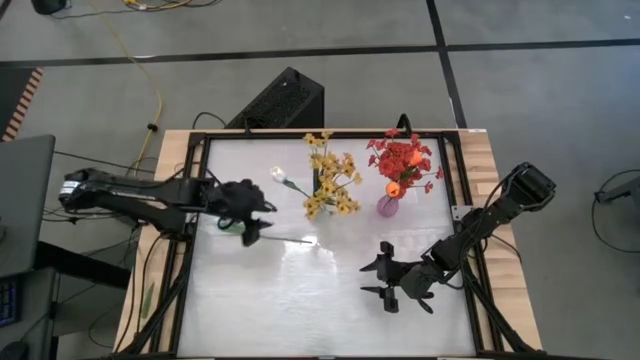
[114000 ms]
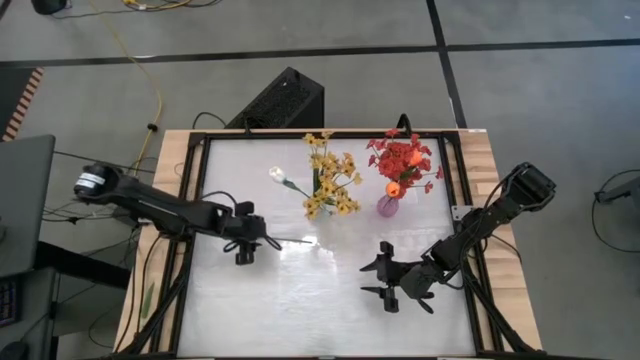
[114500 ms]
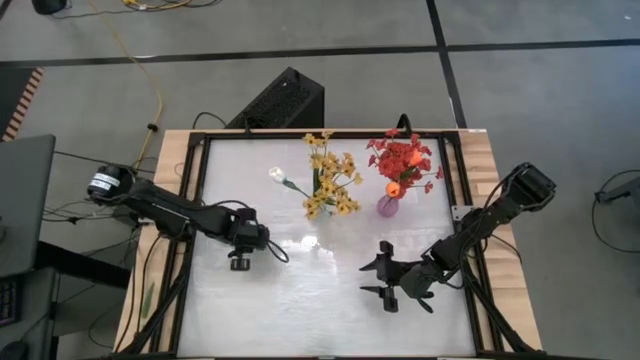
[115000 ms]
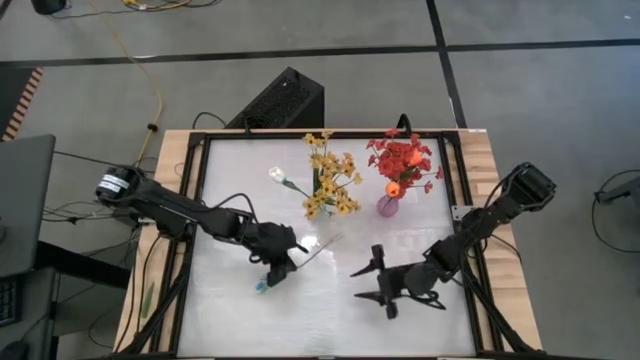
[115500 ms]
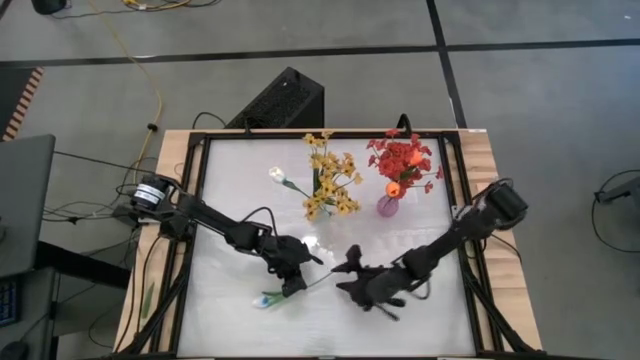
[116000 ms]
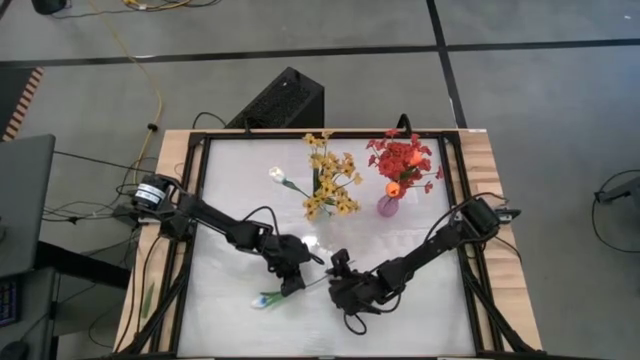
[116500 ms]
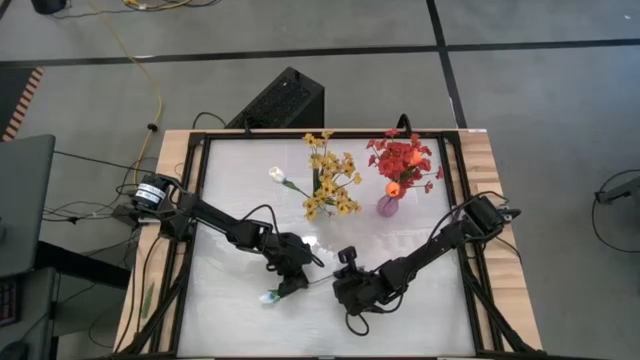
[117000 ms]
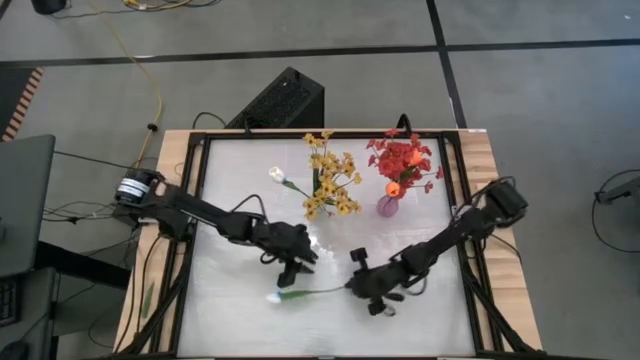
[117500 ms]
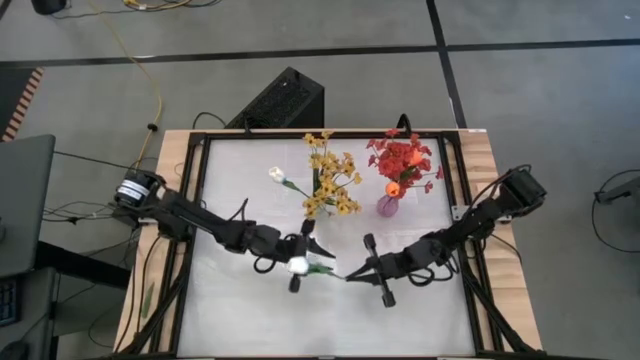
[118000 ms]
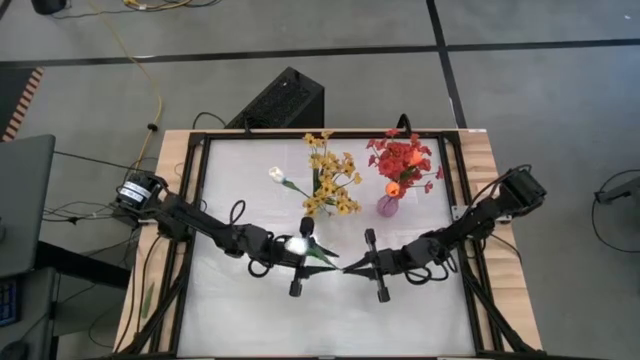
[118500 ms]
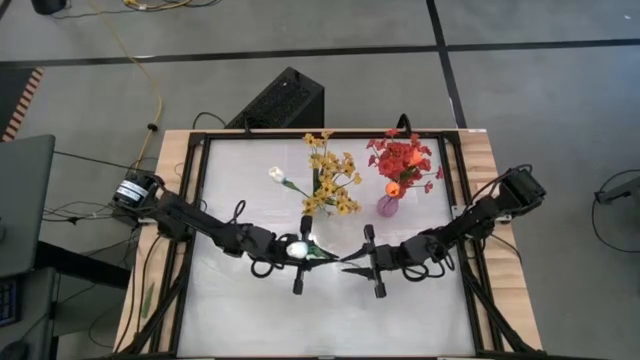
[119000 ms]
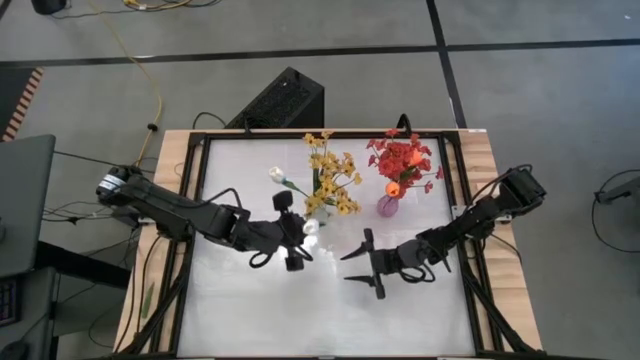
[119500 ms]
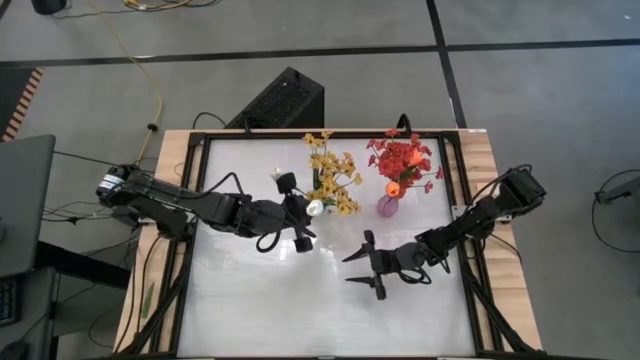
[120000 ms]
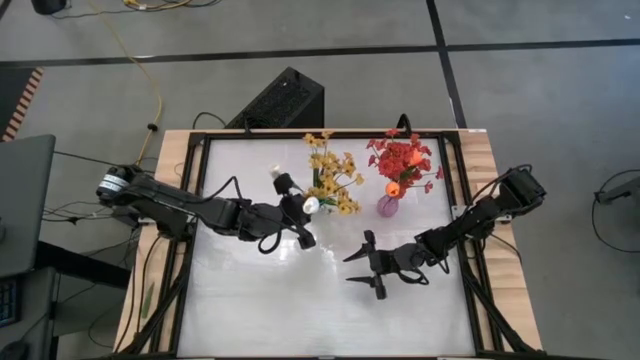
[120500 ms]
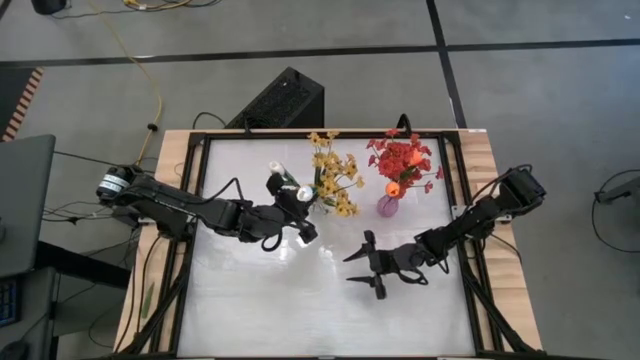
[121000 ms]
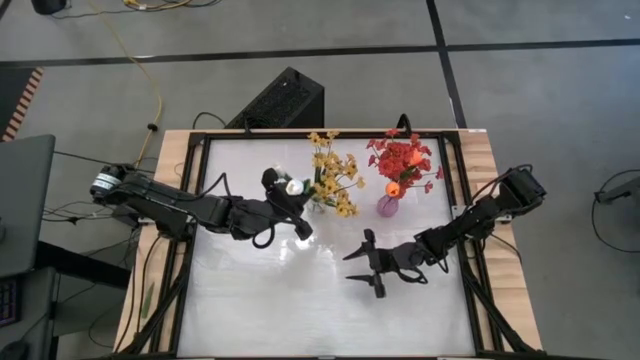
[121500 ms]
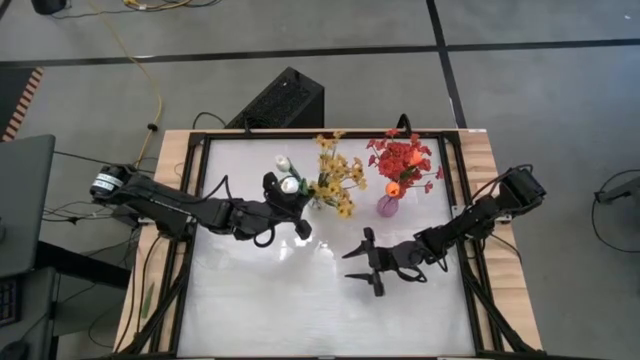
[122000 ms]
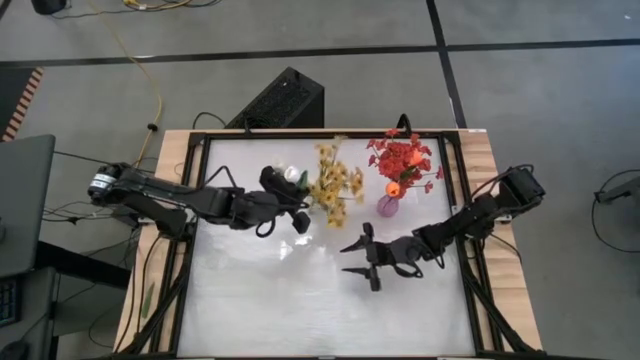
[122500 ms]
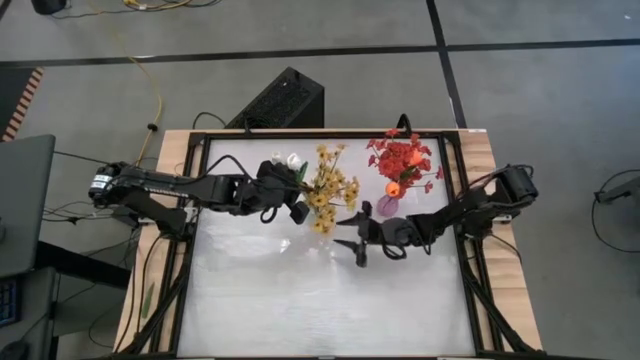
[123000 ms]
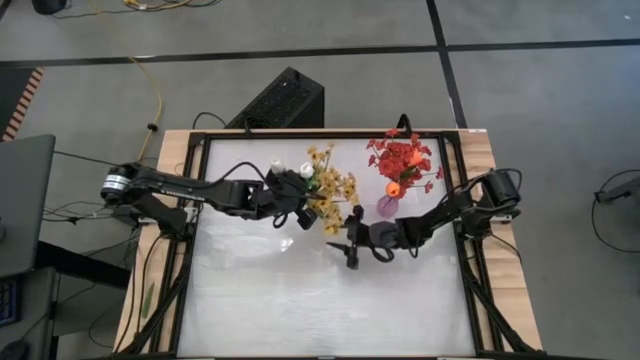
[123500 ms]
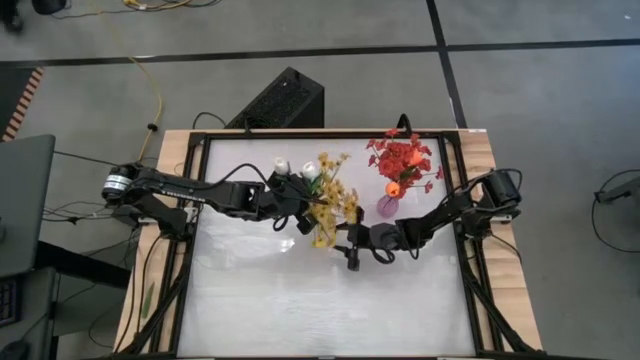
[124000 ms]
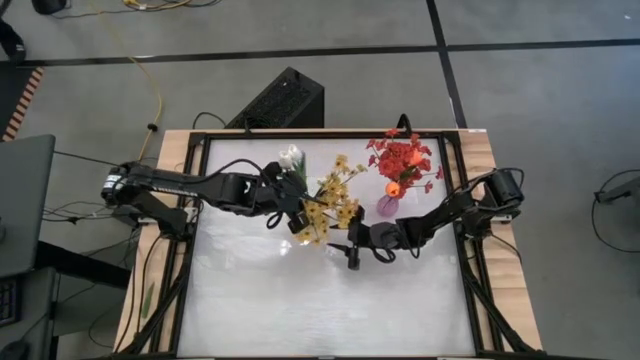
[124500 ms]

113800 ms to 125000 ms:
Task: Sort flowers into vase by color
Put the white flower into the transparent flower vase

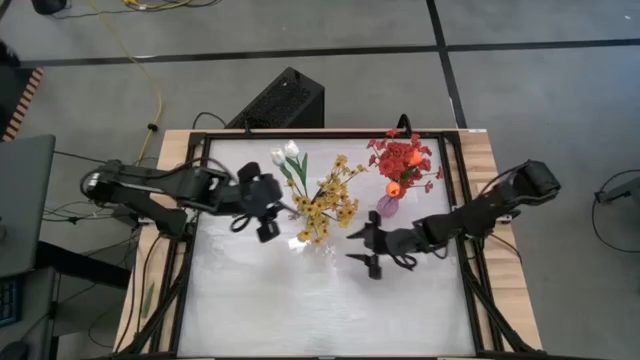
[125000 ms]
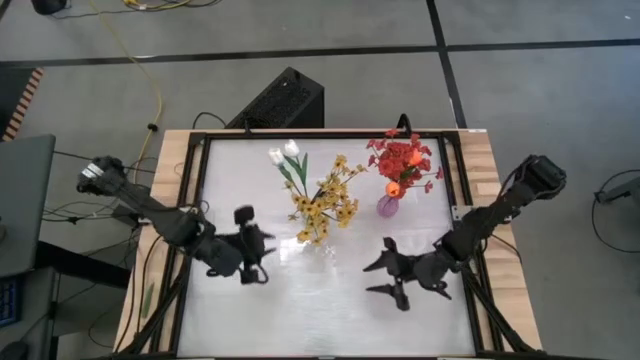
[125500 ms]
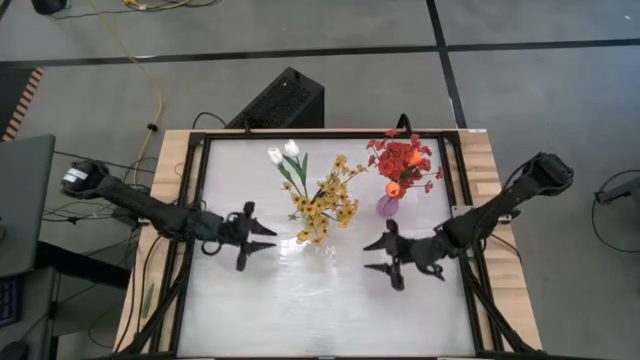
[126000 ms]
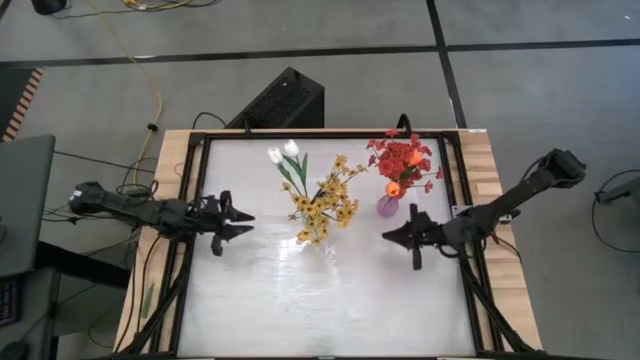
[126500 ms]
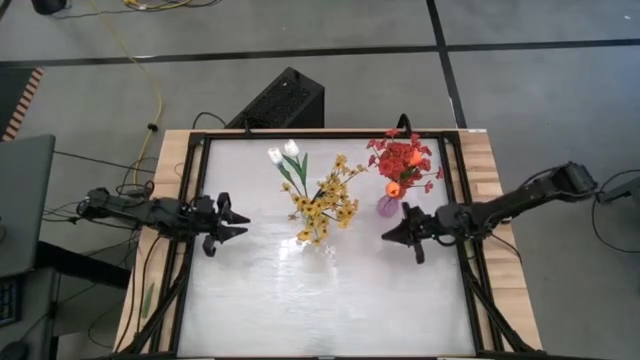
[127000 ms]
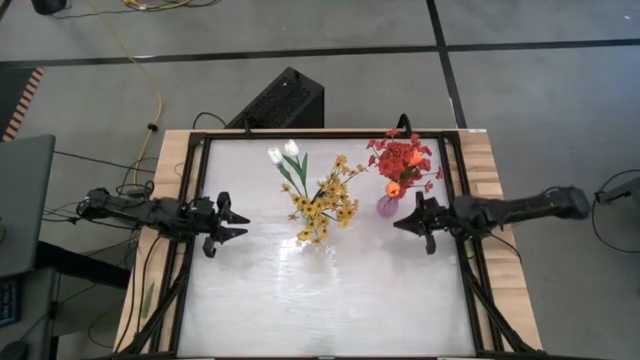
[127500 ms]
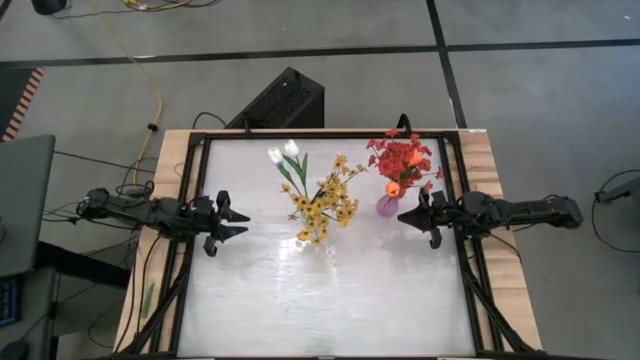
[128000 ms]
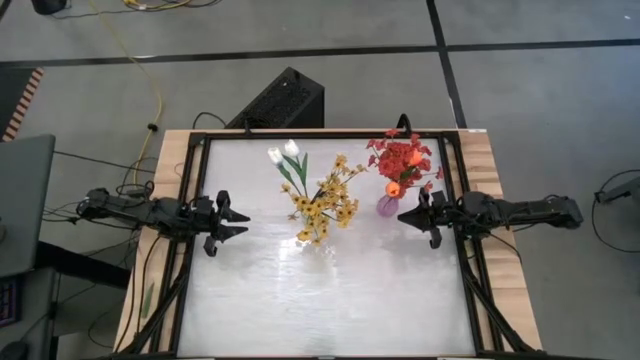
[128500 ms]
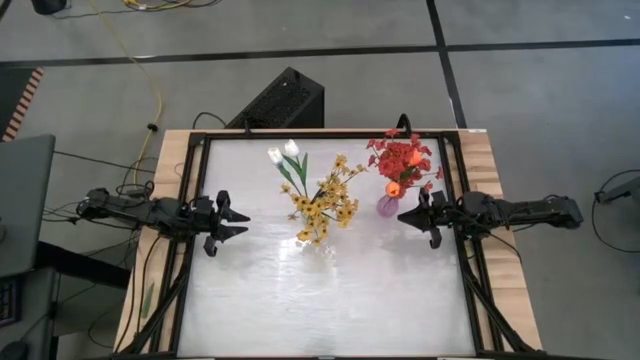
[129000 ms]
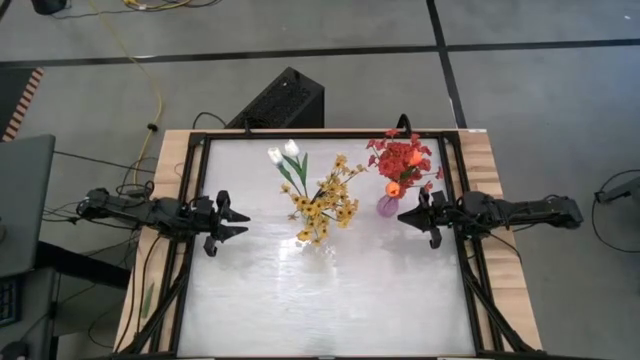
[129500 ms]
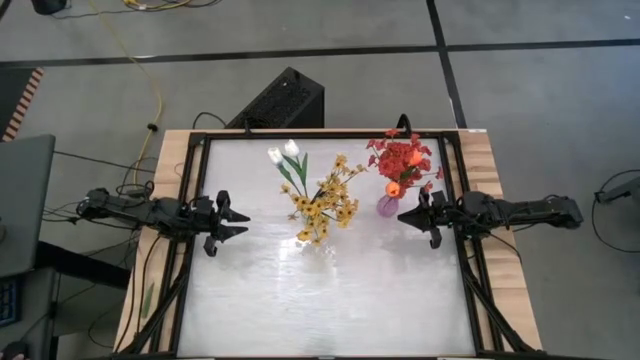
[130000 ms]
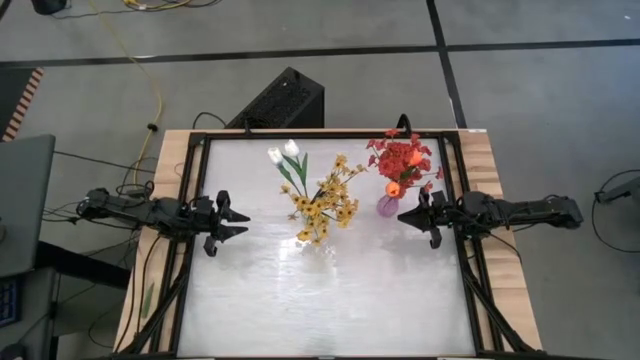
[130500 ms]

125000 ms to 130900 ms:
Return to Home Position

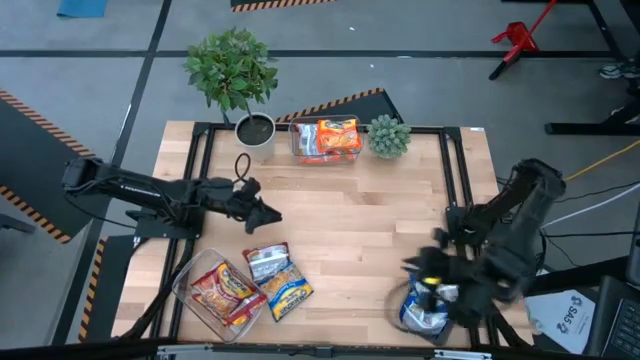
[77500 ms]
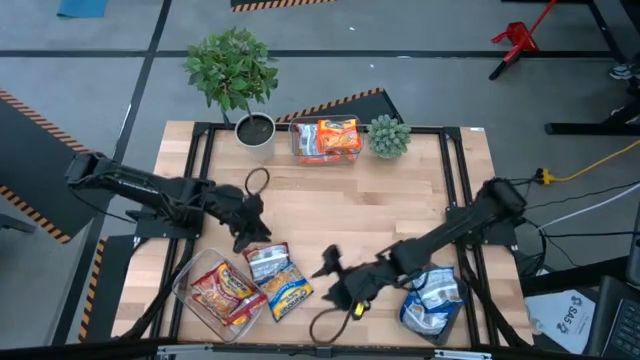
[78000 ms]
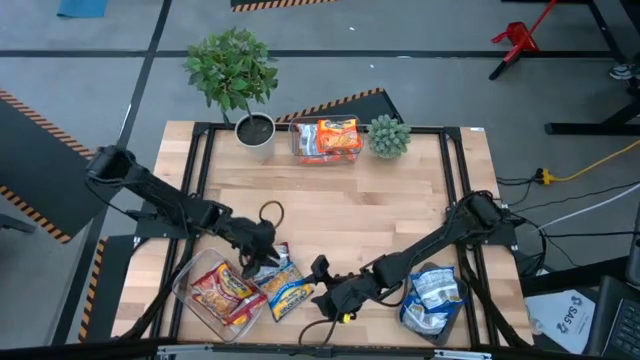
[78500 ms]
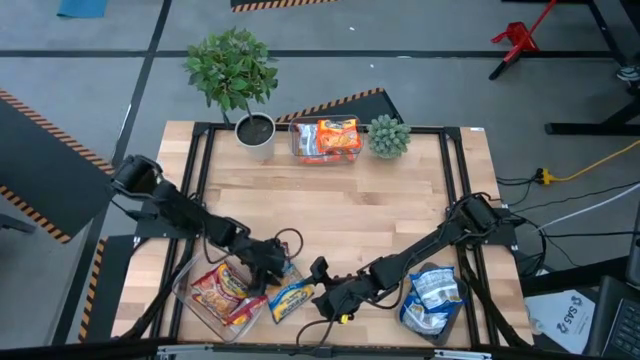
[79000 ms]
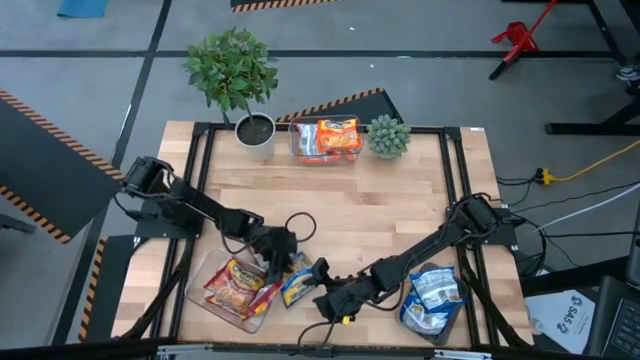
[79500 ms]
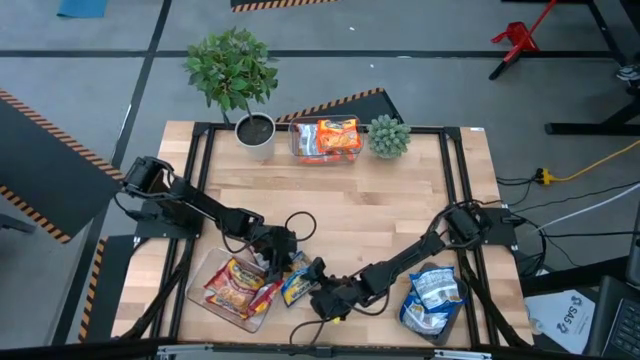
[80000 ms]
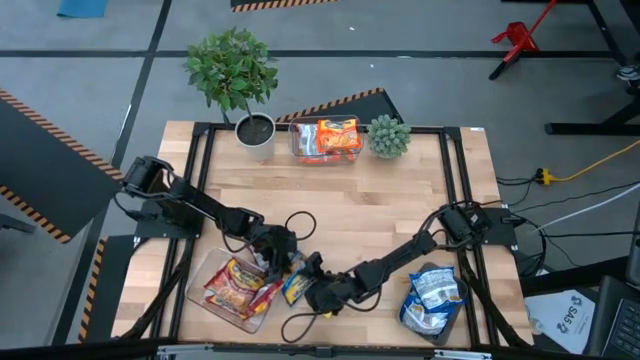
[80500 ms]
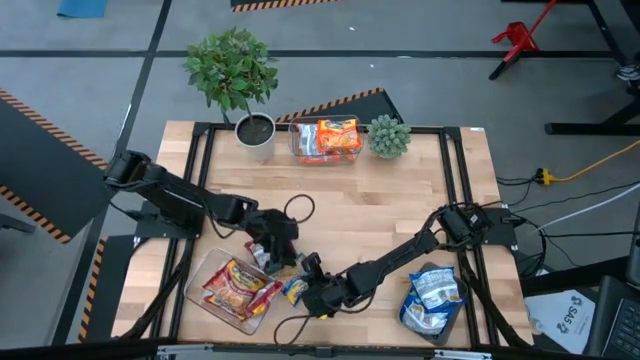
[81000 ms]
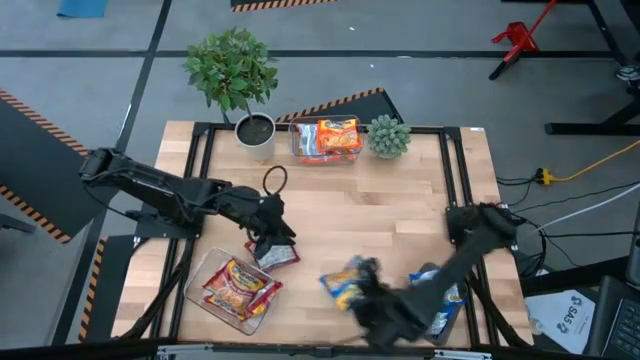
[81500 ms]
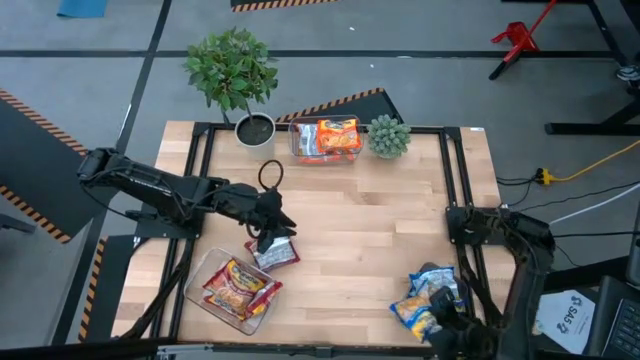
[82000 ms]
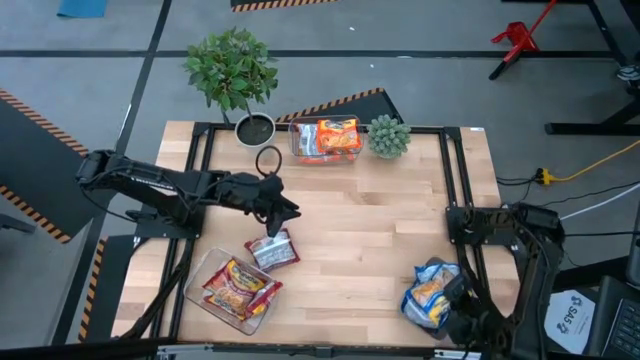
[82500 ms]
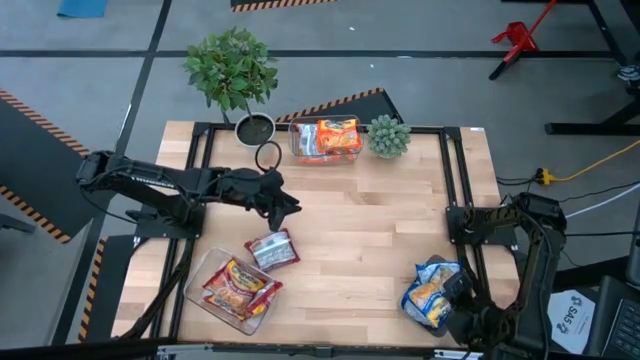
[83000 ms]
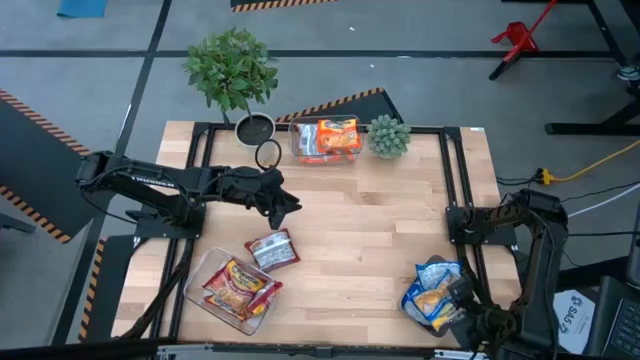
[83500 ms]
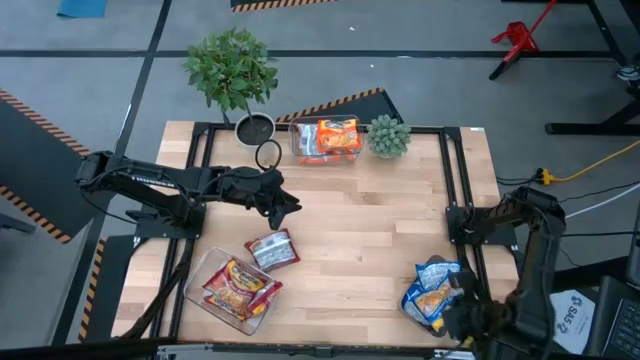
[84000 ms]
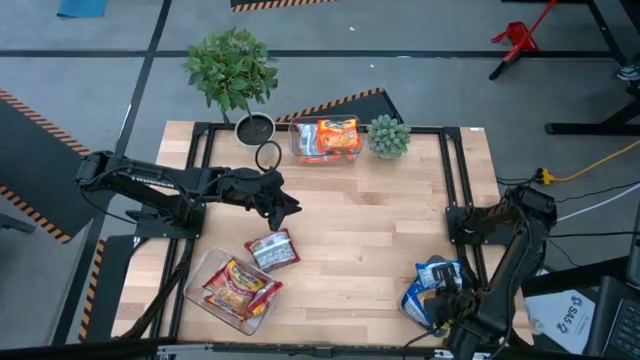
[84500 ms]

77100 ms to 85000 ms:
Task: Sort Maruchan noodles
Put the blue noodle pack into the black bin
